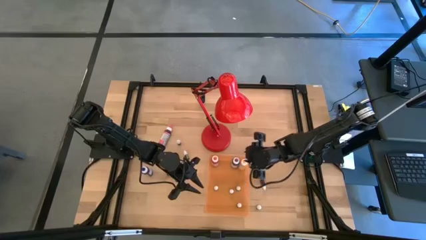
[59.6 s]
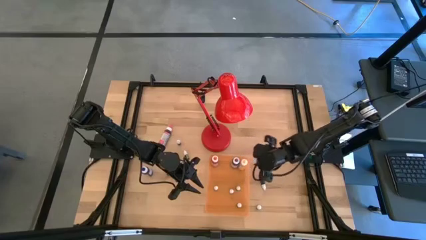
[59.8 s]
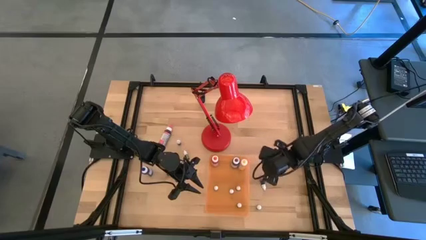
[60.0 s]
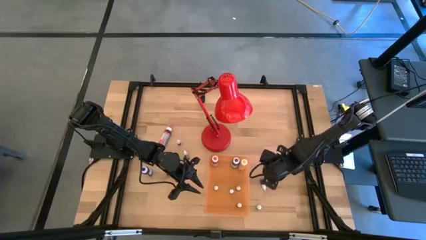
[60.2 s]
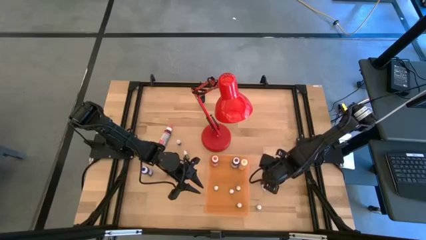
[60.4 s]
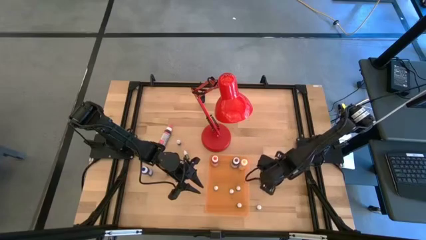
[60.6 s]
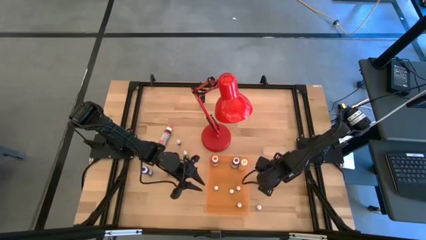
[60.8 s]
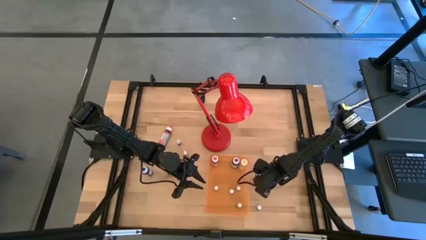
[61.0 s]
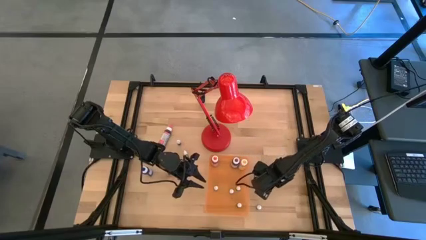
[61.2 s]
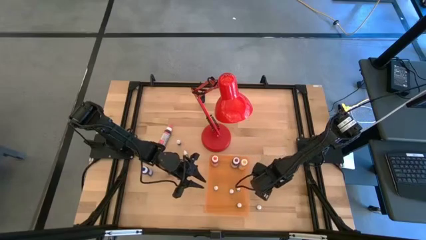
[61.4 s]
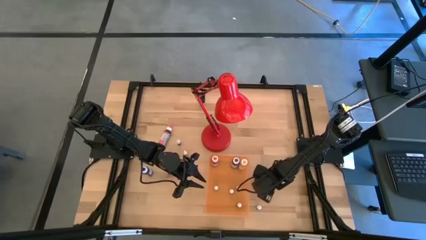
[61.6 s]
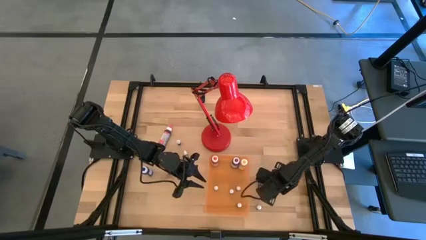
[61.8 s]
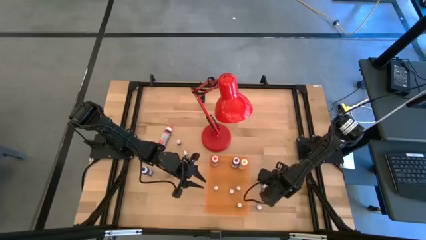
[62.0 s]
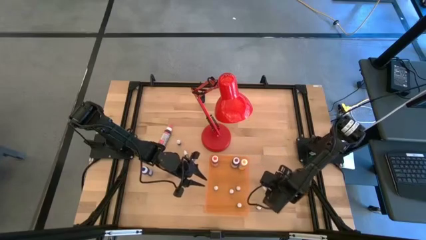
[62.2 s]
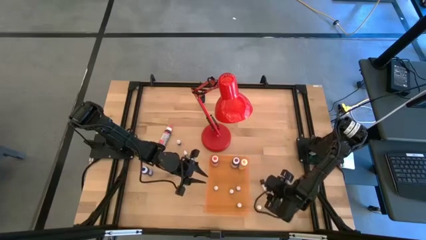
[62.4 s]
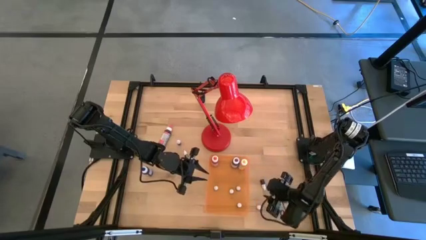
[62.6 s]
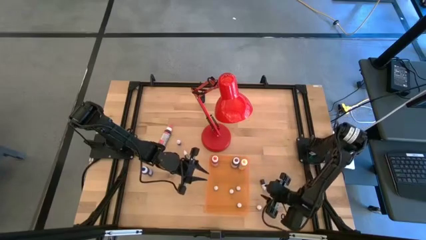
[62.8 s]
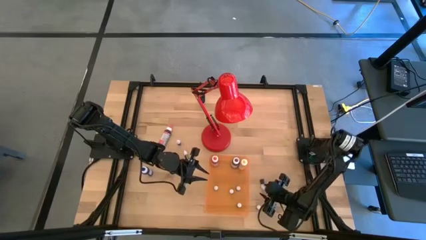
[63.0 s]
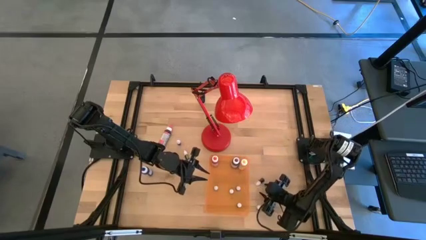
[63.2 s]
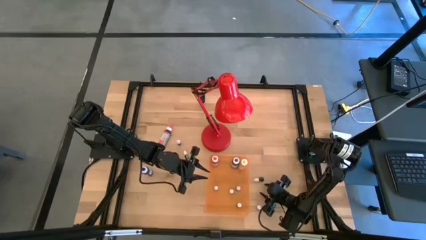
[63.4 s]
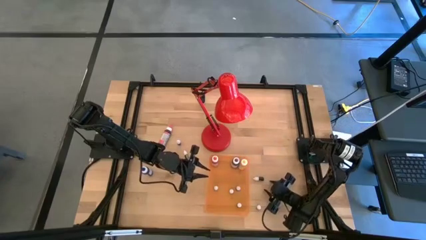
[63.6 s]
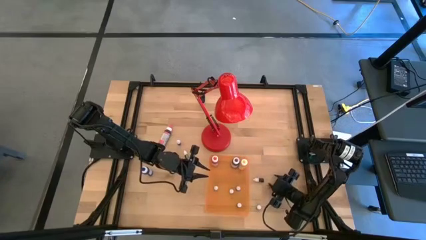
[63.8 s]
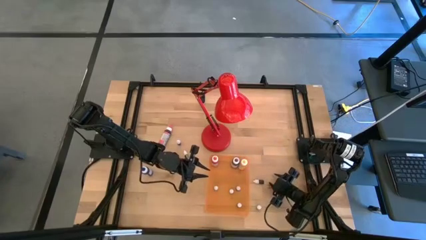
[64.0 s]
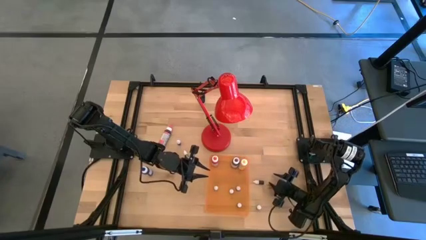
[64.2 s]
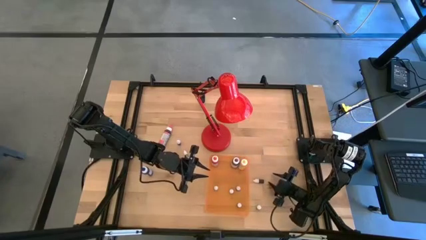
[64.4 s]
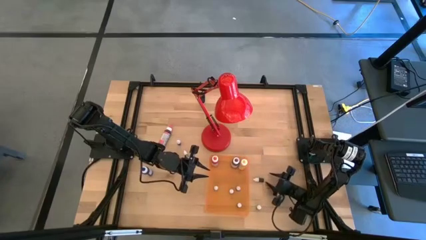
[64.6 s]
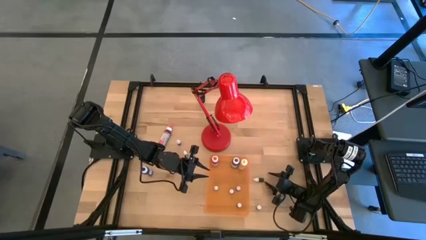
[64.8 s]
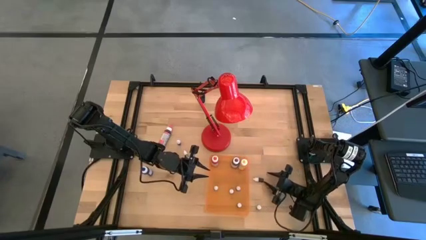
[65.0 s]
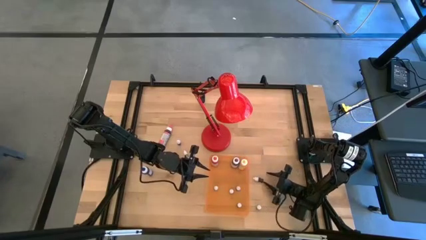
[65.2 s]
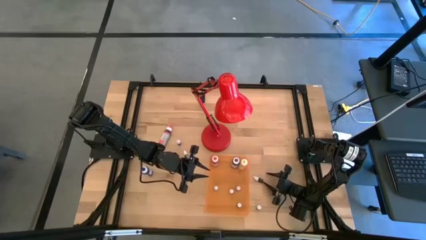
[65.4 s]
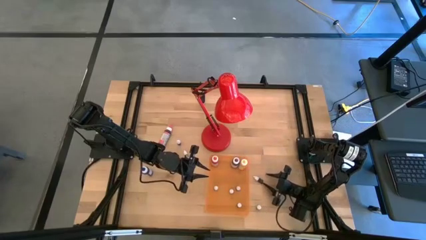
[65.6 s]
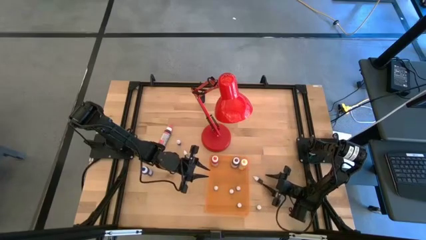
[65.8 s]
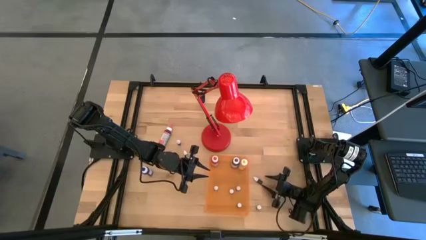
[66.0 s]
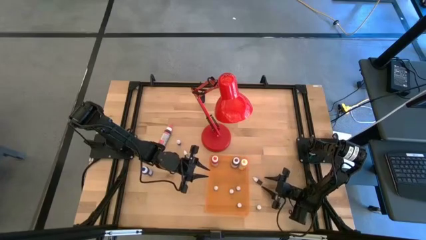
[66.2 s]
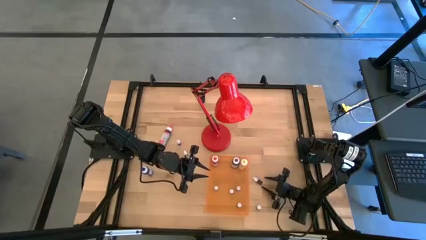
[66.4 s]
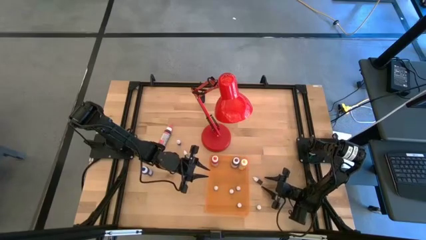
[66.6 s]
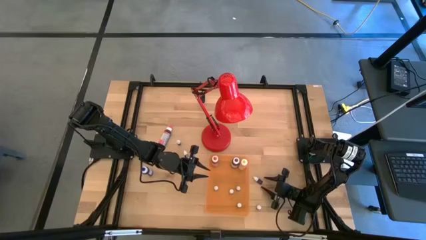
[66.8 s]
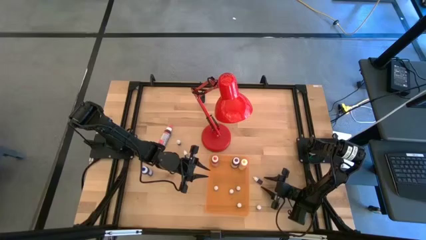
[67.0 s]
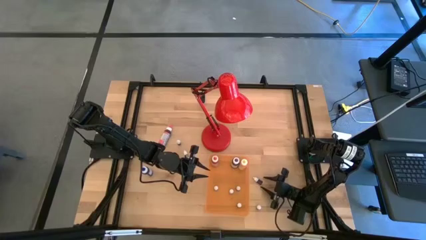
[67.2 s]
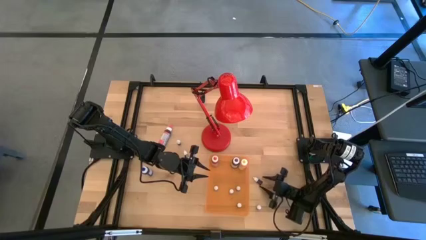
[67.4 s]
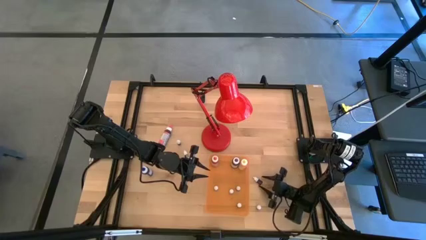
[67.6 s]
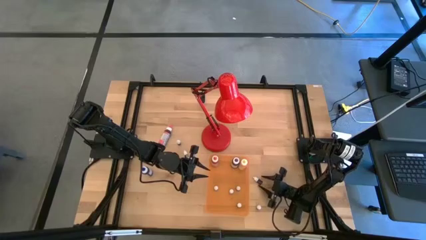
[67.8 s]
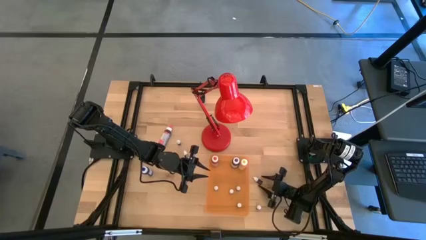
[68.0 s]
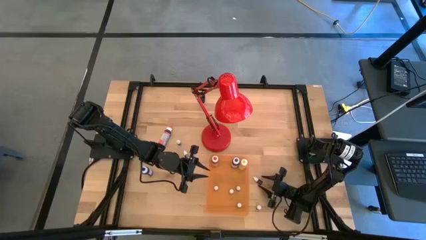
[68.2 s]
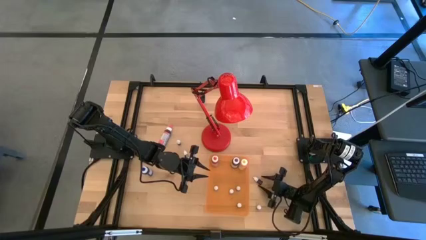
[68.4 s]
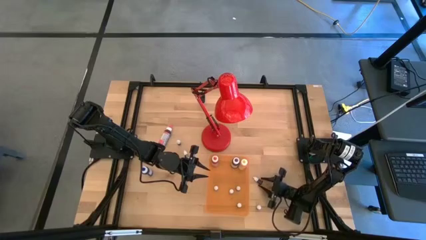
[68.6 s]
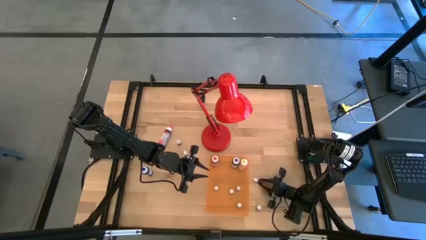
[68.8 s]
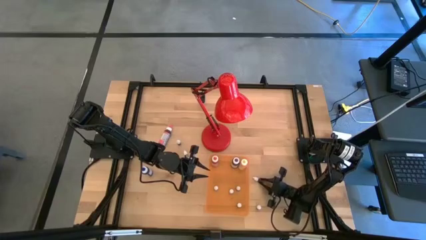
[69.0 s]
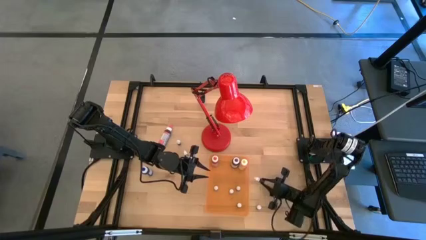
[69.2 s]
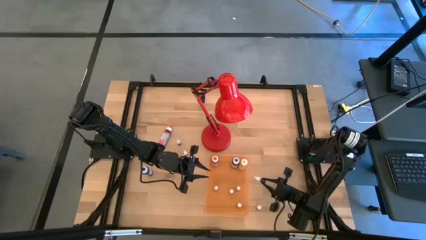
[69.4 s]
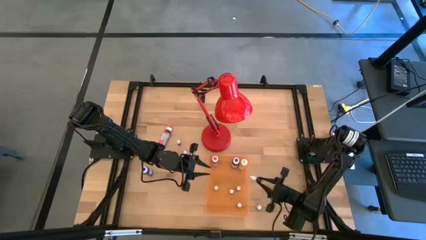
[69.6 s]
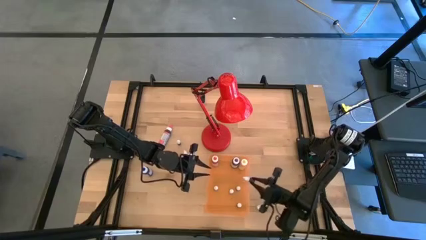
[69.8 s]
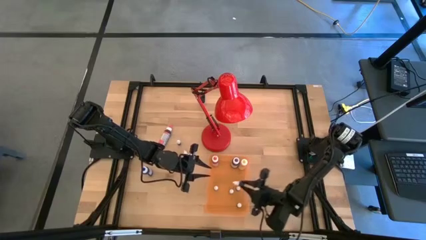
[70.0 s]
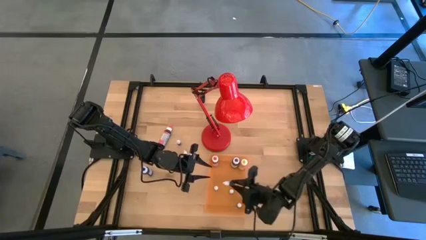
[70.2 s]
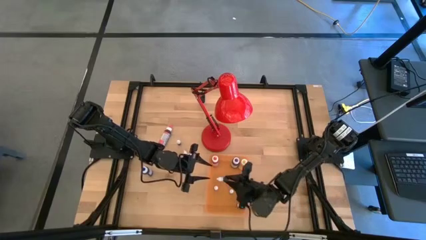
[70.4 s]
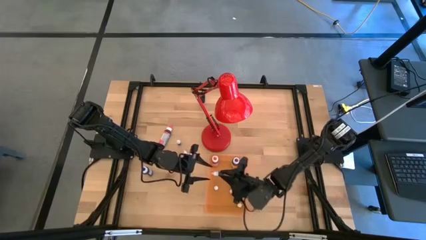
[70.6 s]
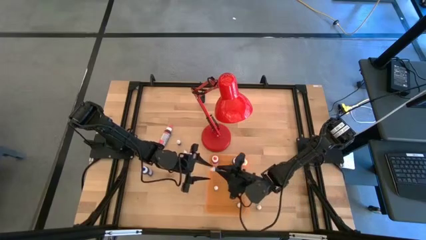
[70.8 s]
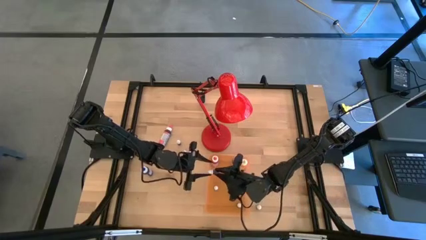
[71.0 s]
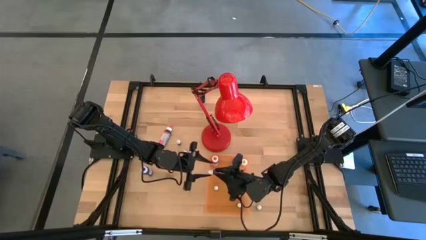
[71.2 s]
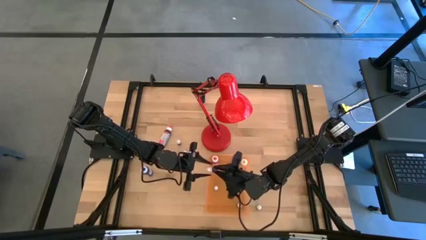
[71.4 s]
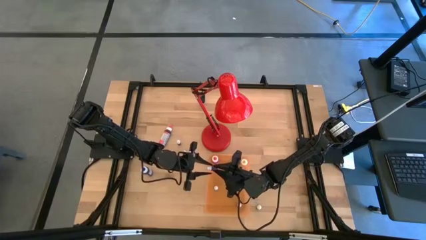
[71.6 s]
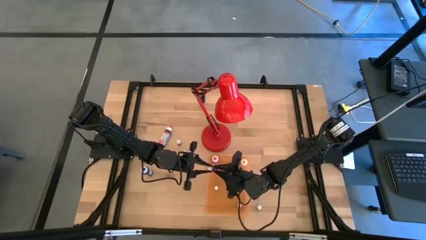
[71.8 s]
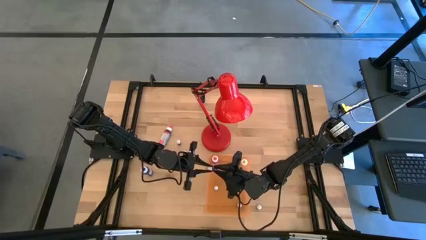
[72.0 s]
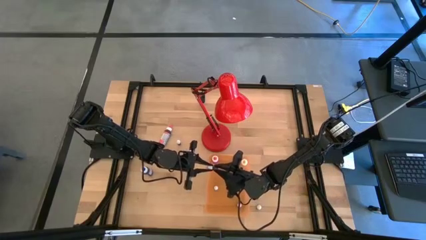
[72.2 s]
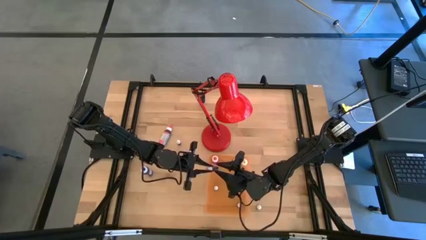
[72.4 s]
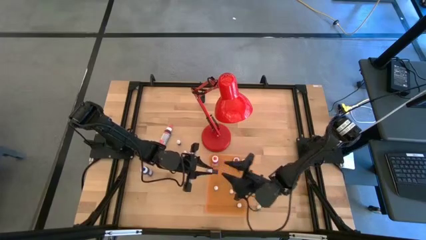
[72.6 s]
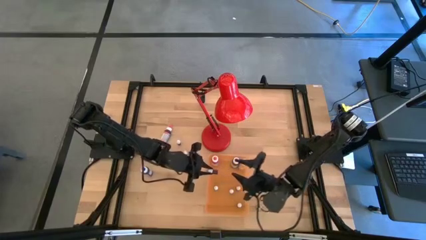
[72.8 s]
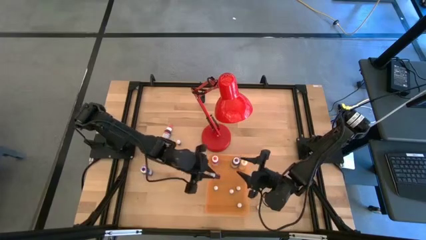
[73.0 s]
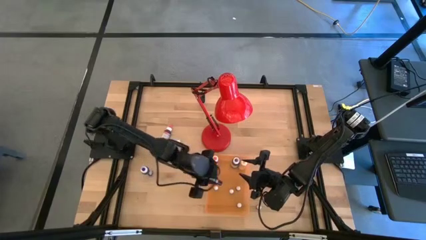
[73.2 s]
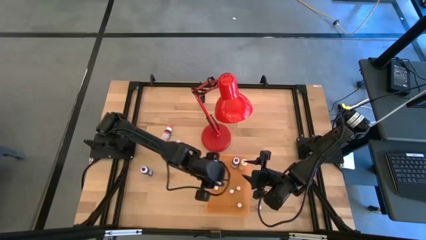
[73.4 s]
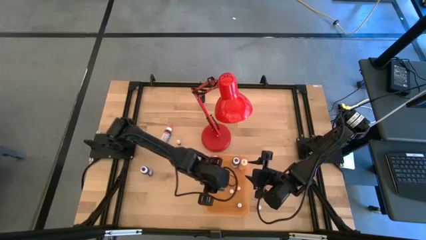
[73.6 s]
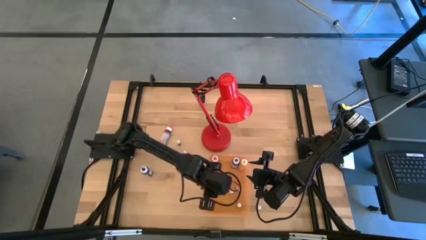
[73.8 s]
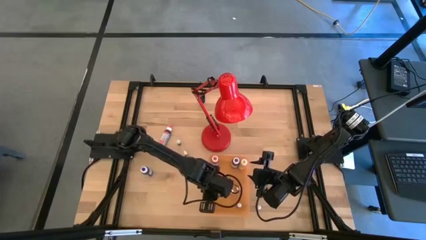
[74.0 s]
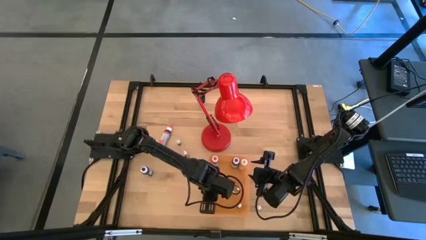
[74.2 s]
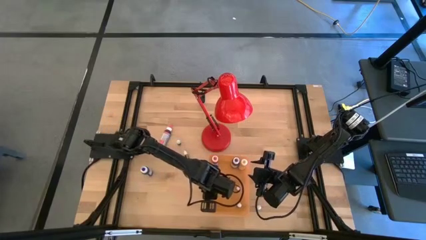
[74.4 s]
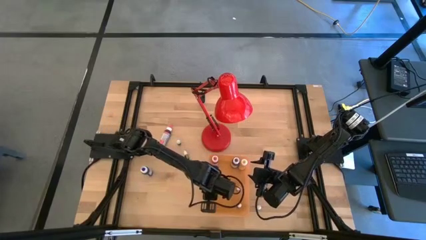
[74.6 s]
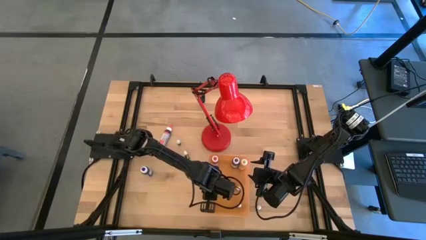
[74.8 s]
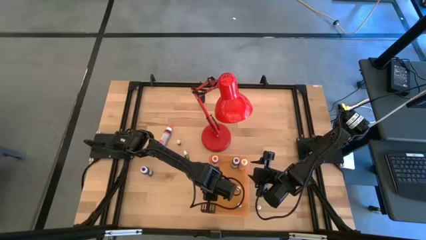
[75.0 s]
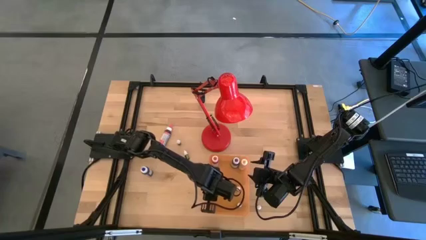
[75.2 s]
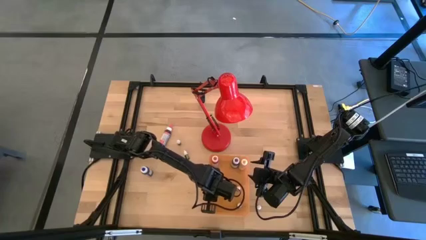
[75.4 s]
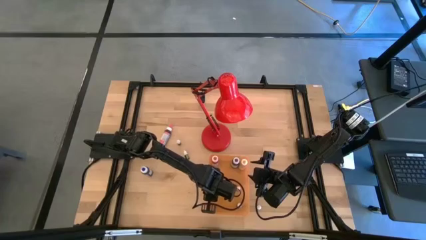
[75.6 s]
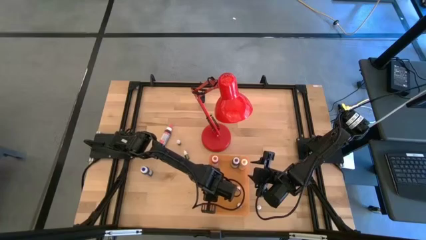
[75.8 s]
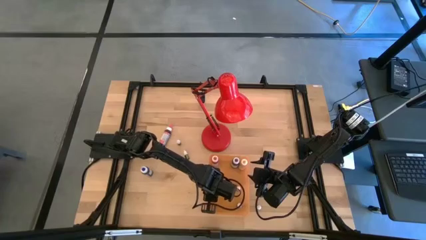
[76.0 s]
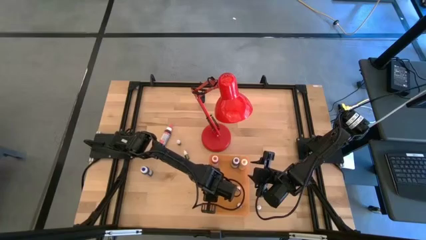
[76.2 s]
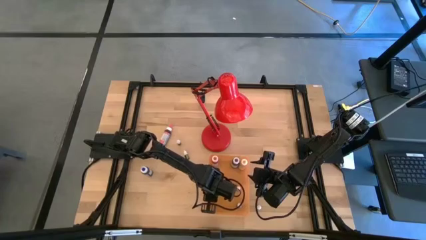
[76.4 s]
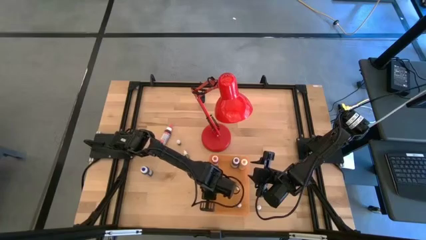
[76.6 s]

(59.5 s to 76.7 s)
Task: Pick & Place food coloring
Put the right small red food coloring bottle into the orange bin
